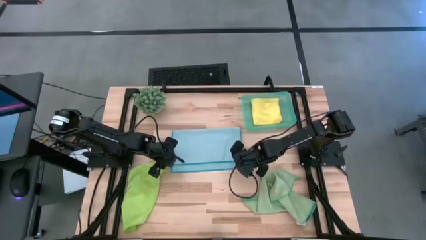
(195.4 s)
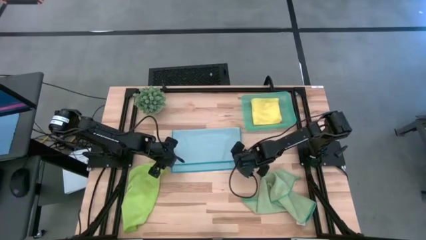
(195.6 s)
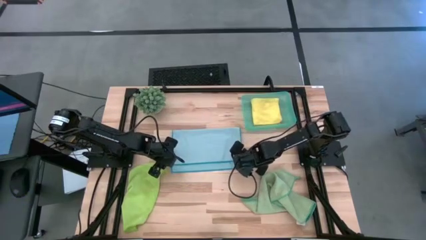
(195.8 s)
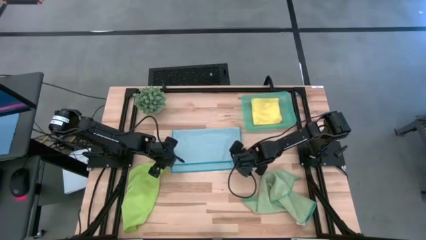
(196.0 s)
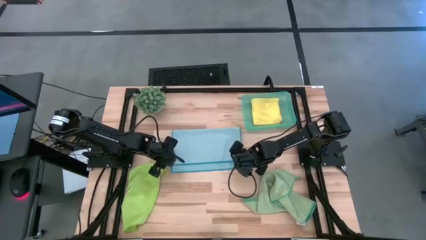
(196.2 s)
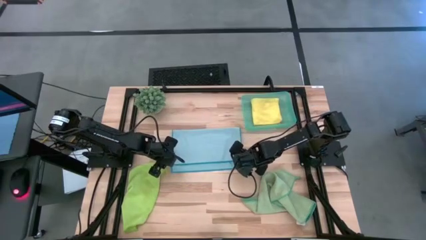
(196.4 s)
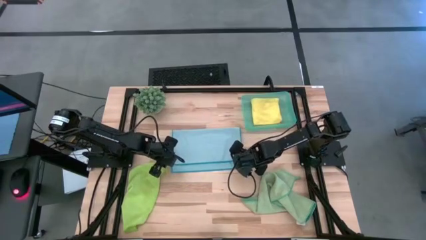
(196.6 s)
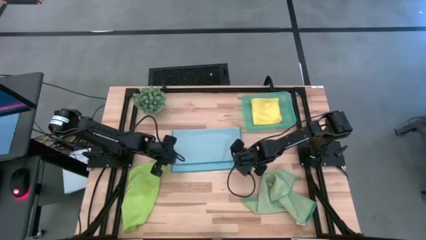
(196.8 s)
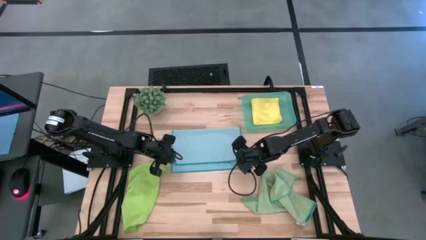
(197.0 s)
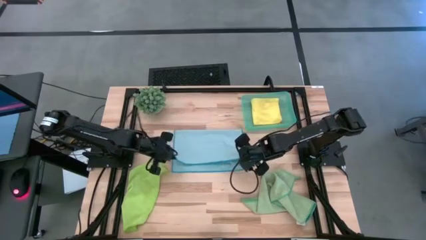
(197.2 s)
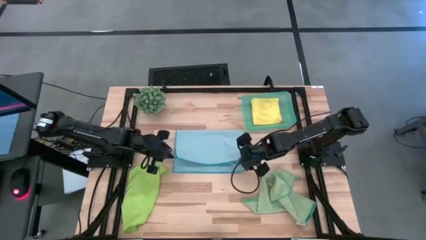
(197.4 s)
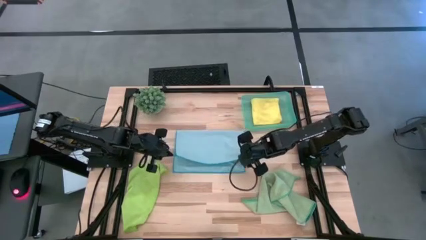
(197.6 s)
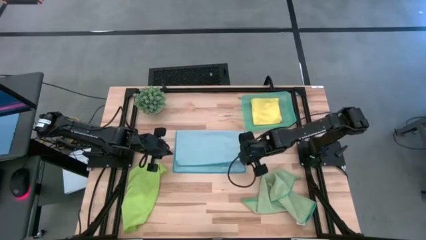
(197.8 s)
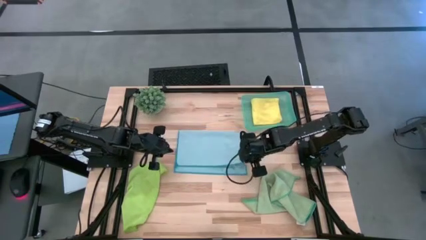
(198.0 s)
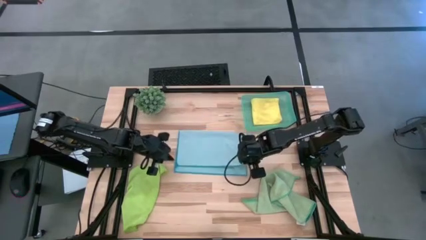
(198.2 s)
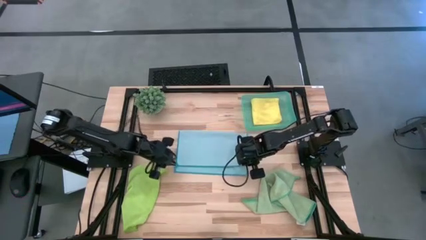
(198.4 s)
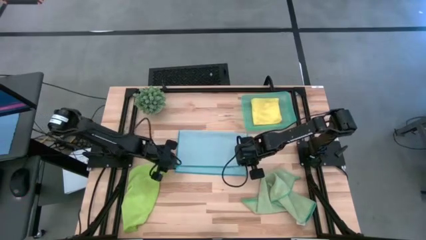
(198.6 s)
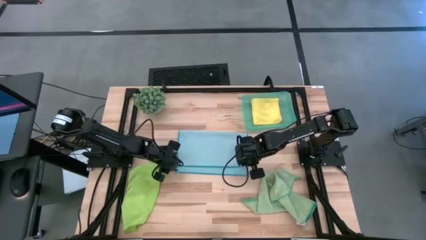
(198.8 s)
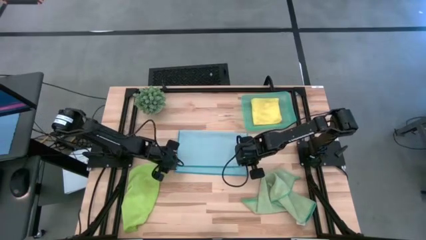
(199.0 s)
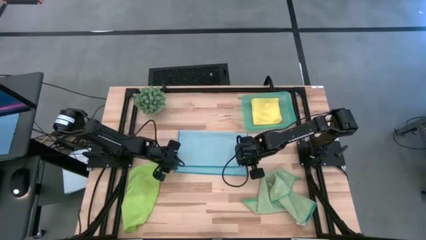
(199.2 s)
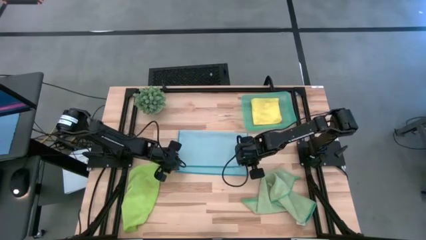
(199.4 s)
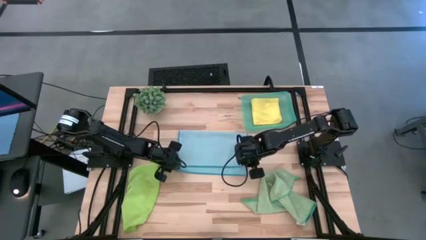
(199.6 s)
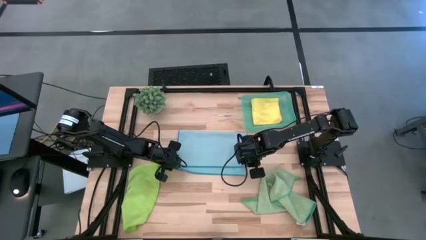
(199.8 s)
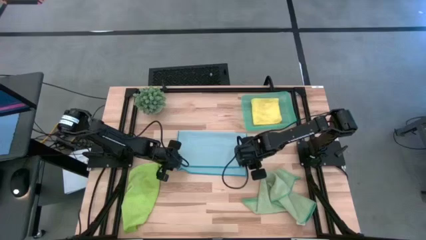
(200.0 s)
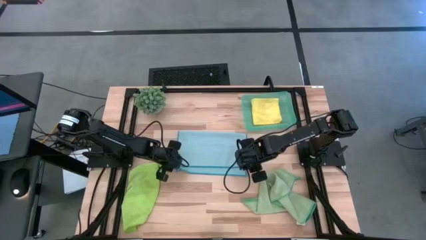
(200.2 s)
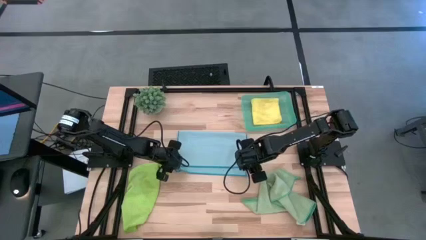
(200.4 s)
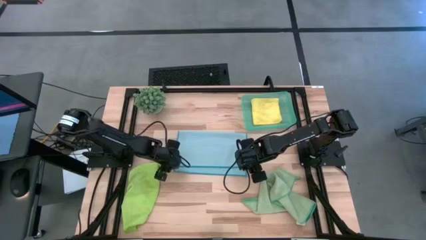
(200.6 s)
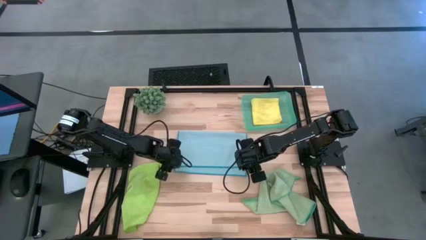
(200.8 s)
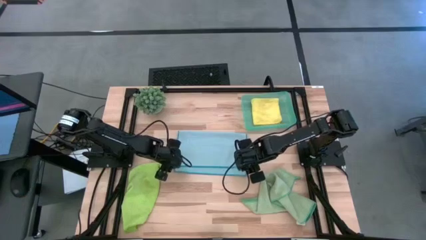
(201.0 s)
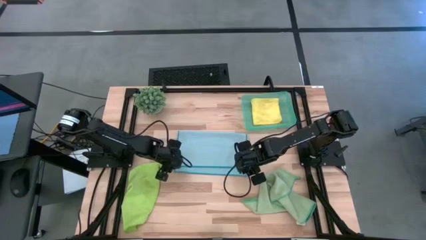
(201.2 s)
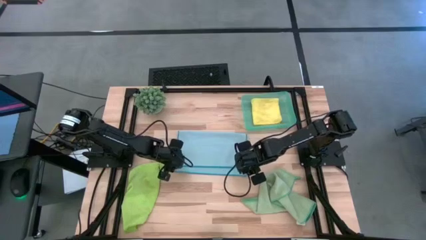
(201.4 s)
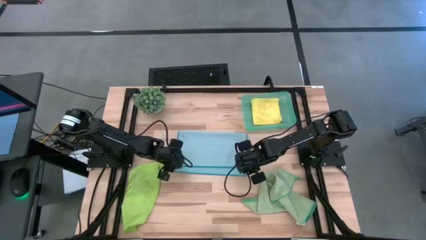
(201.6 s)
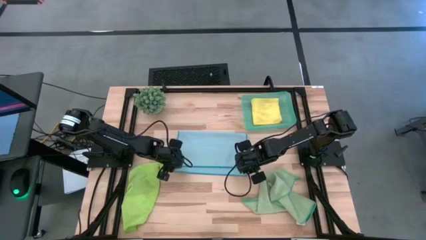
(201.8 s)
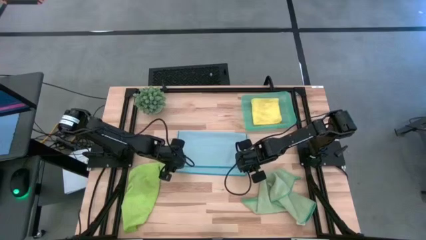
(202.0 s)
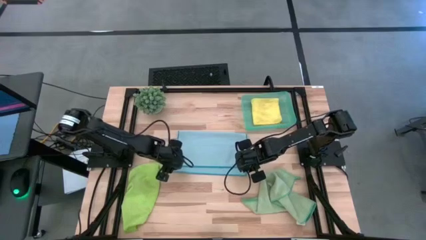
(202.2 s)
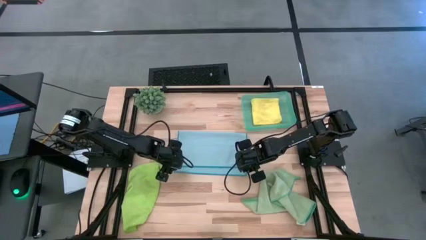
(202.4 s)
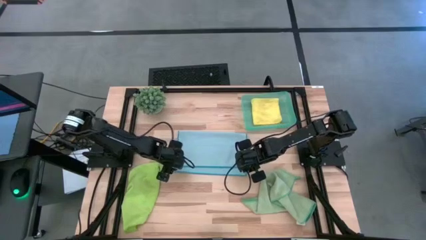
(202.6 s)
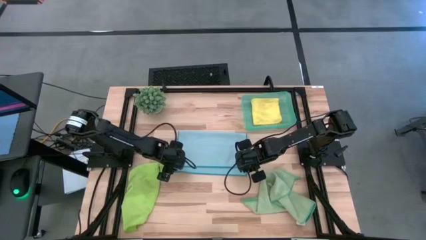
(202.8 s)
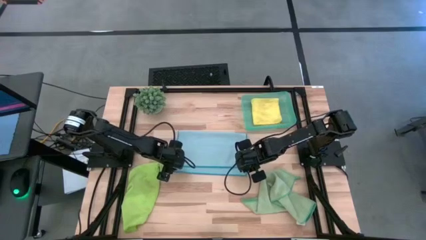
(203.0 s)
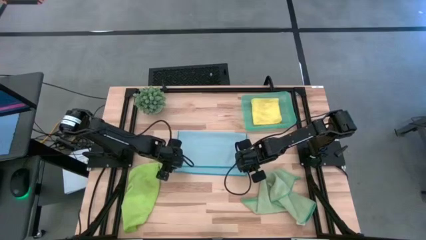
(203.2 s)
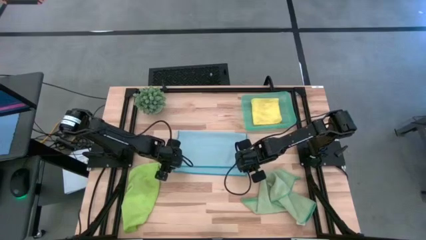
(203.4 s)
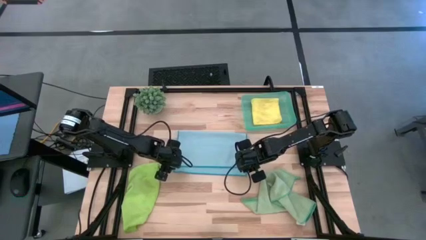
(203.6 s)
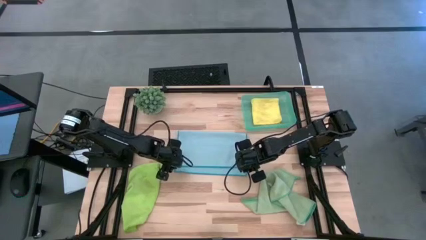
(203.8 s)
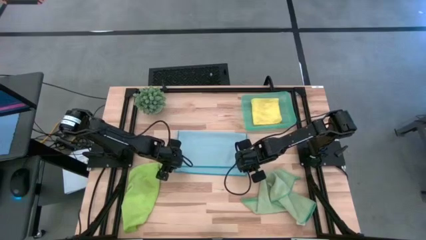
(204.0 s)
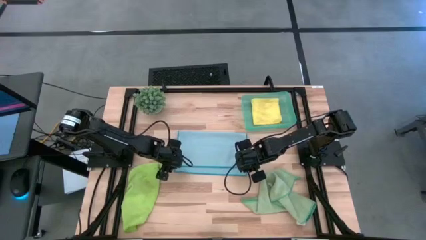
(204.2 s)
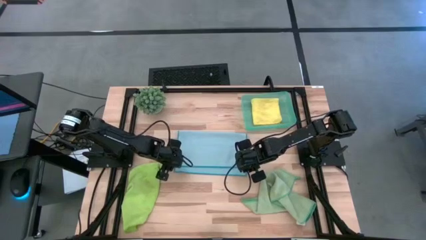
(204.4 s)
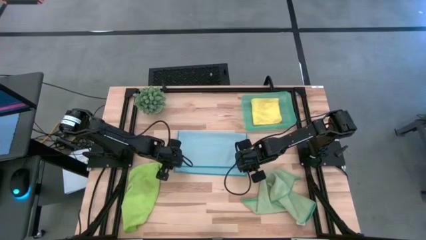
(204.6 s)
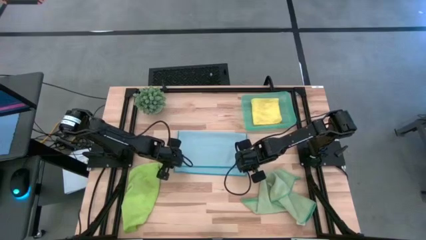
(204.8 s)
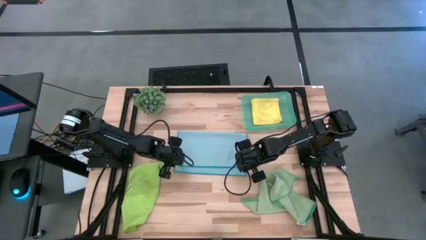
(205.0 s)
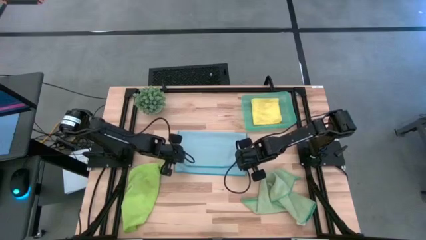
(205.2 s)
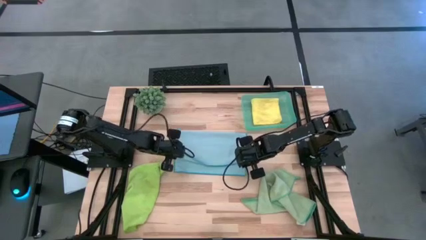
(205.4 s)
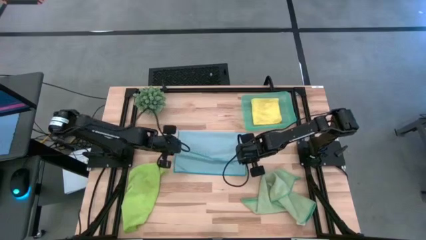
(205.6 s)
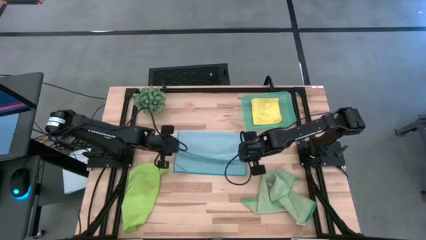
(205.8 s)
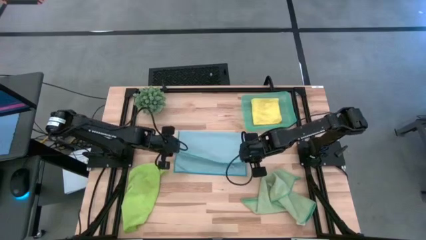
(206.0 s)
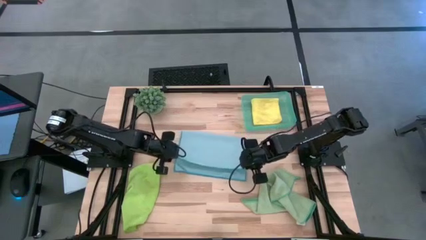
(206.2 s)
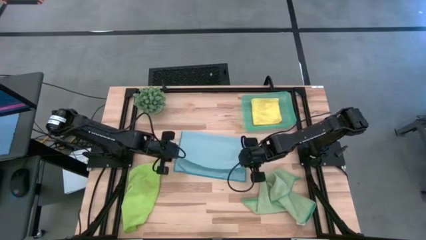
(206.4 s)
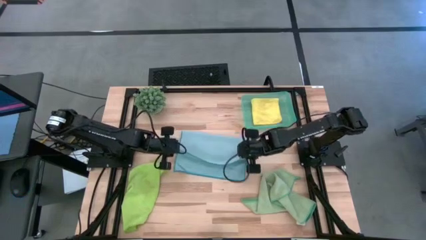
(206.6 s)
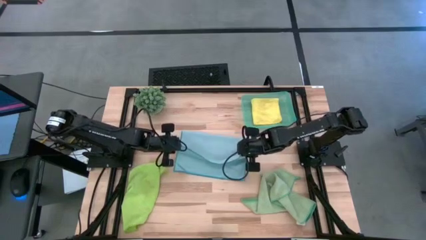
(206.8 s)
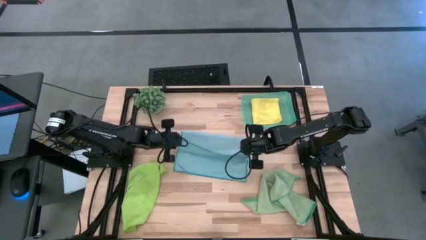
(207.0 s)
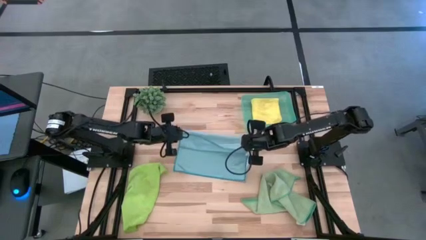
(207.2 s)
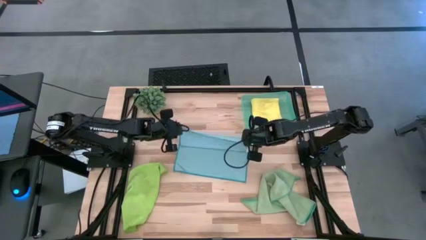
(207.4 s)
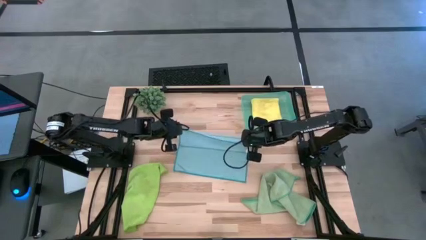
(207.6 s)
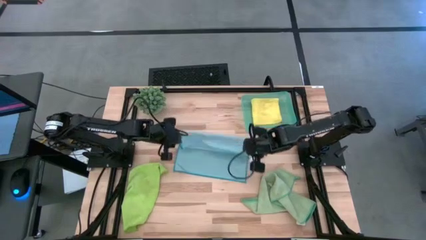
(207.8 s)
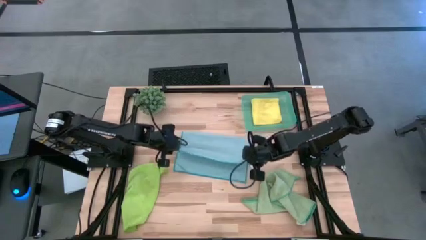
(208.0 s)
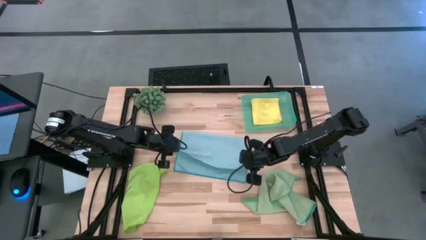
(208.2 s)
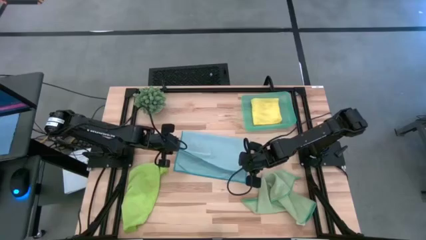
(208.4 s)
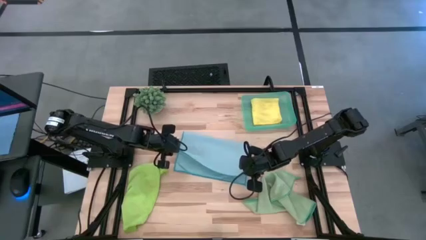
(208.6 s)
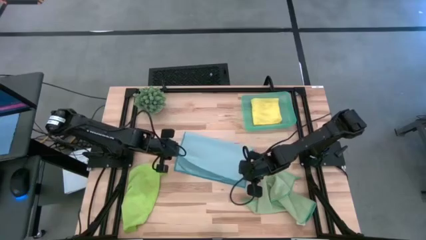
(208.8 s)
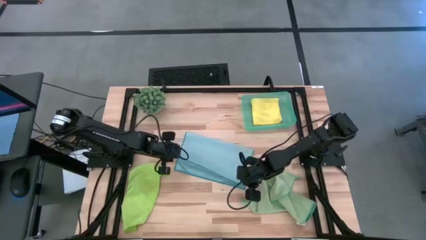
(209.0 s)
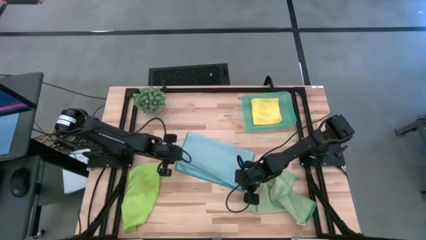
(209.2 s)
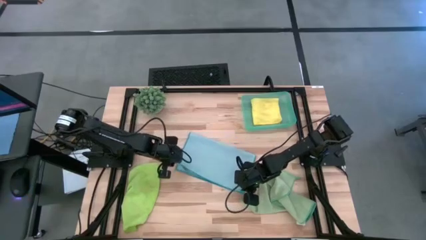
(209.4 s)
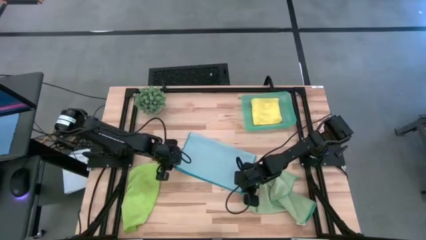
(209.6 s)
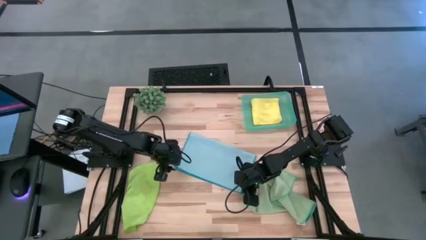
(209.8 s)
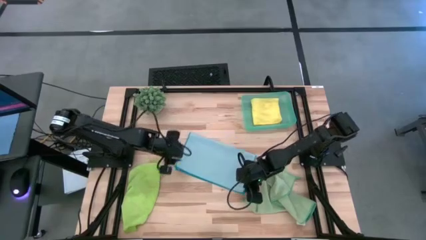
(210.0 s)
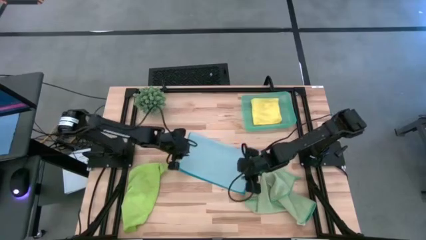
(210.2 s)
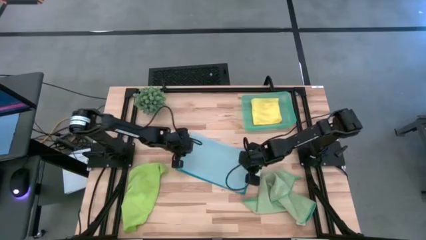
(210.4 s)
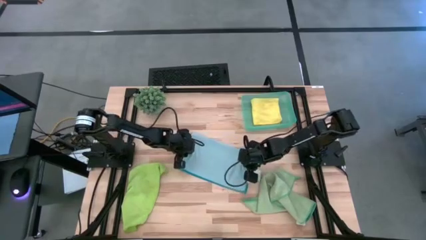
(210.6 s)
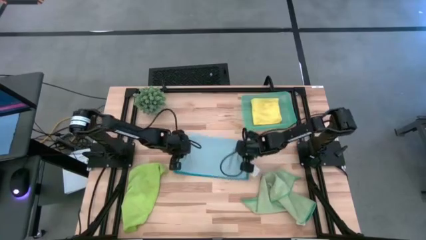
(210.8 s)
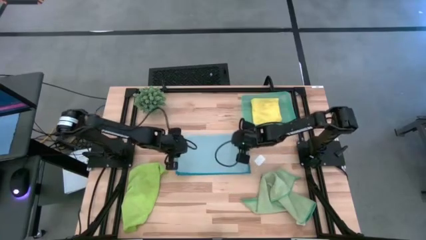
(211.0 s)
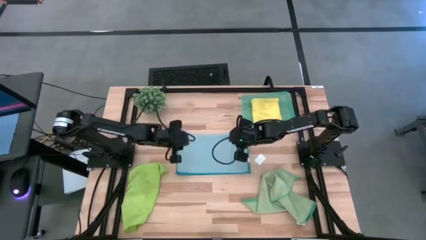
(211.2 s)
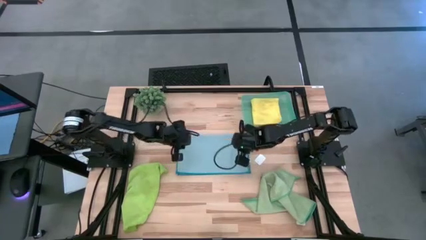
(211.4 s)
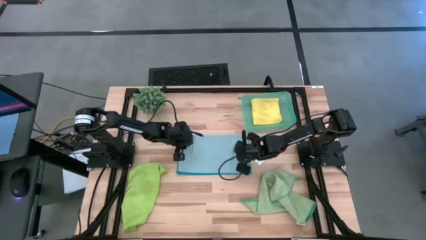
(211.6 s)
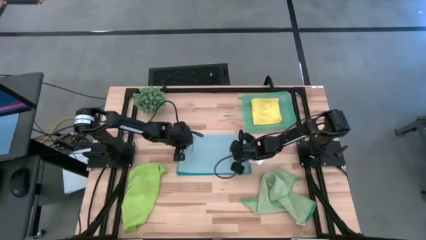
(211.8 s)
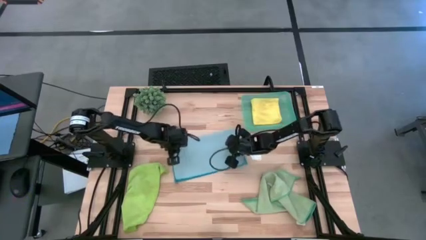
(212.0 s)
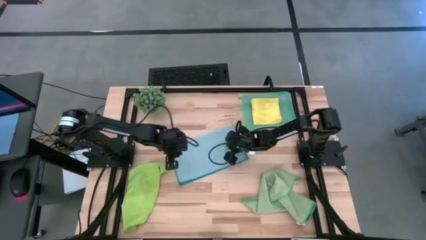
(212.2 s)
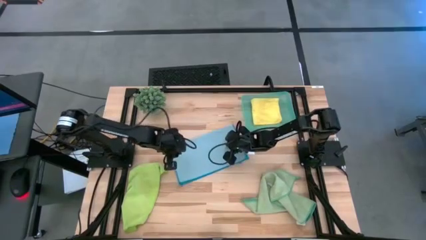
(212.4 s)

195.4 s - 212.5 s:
Task: Fold microfiber towels
Fold the blue microfiber cloth
